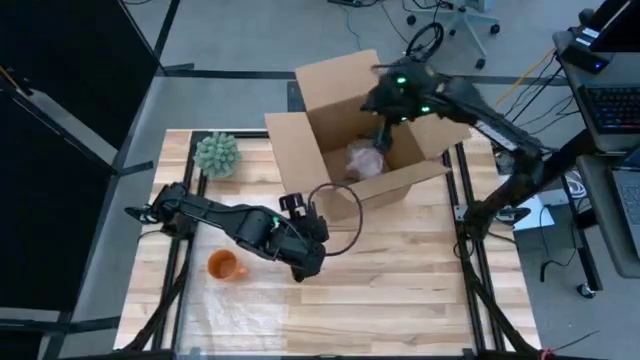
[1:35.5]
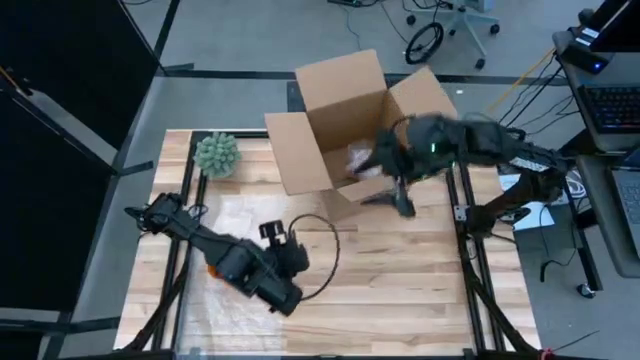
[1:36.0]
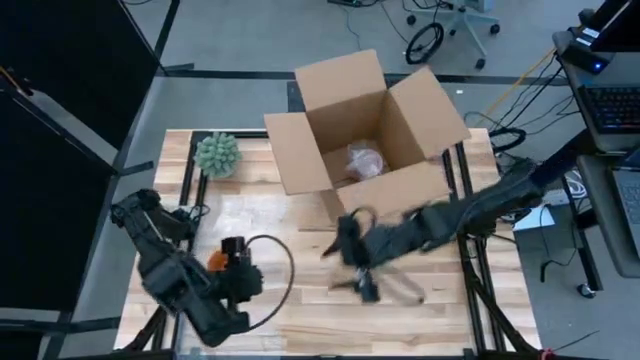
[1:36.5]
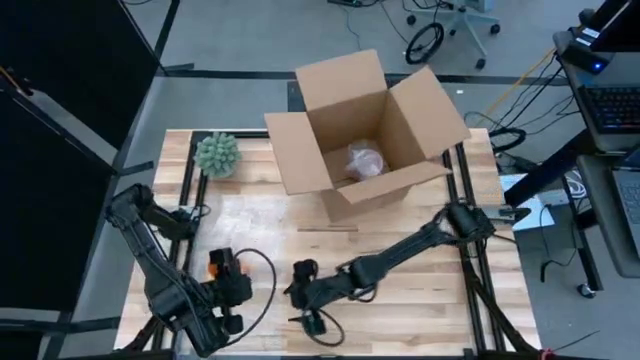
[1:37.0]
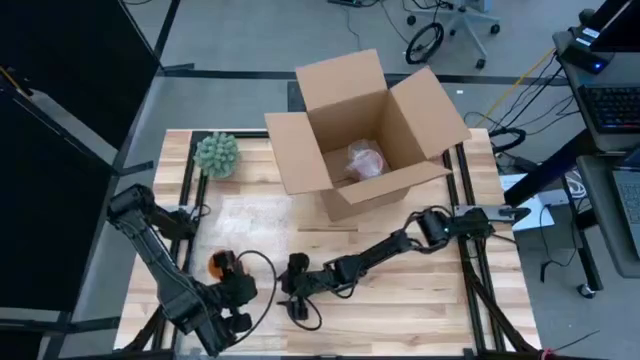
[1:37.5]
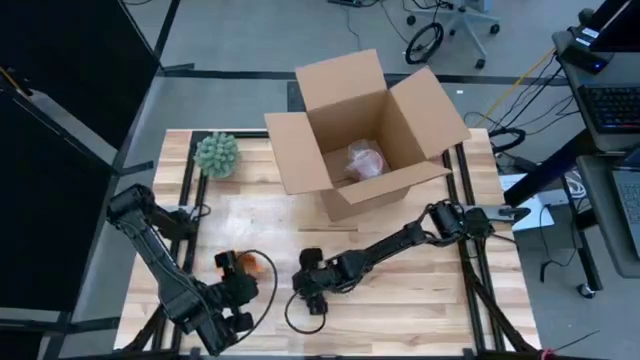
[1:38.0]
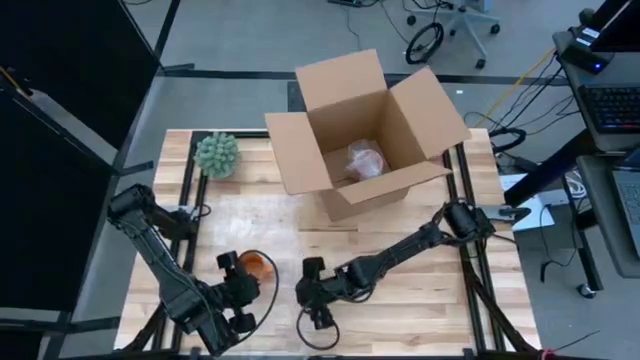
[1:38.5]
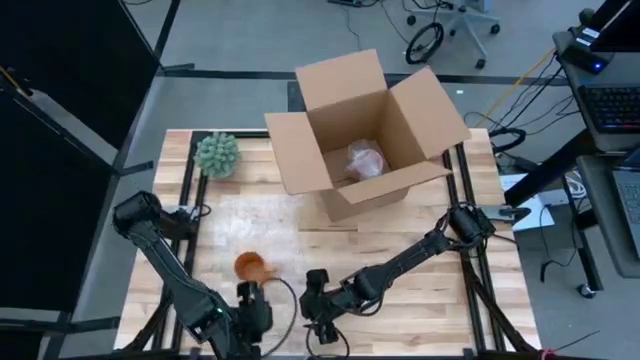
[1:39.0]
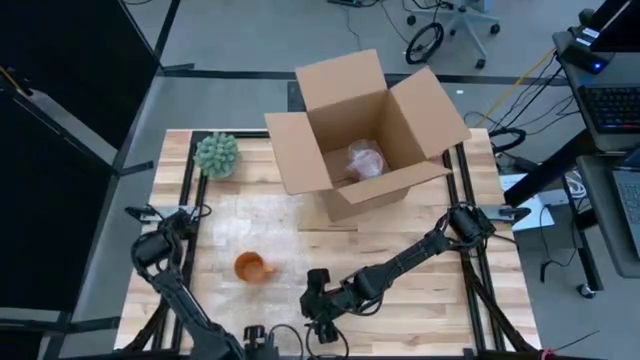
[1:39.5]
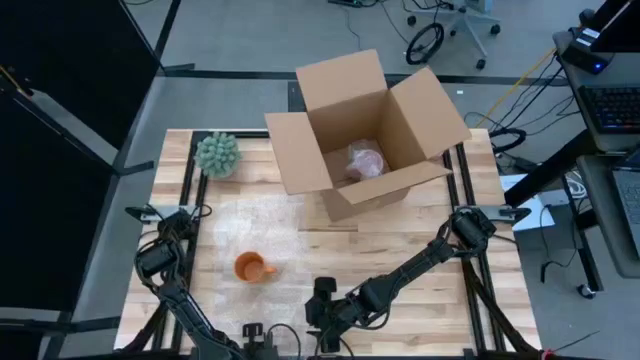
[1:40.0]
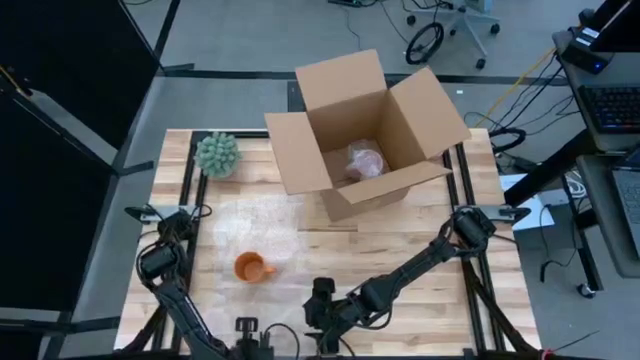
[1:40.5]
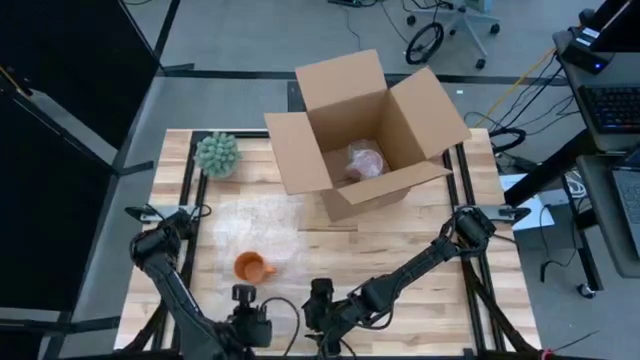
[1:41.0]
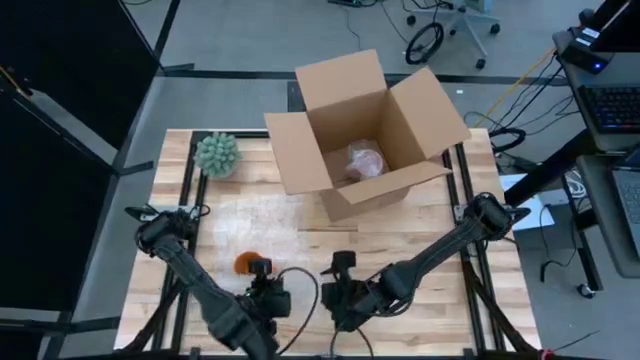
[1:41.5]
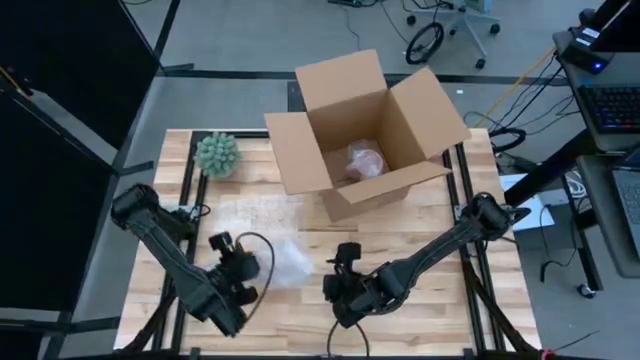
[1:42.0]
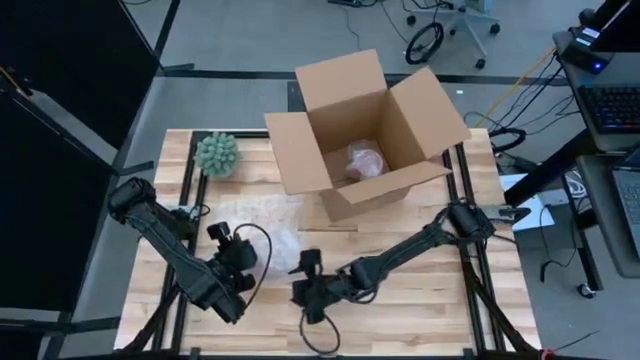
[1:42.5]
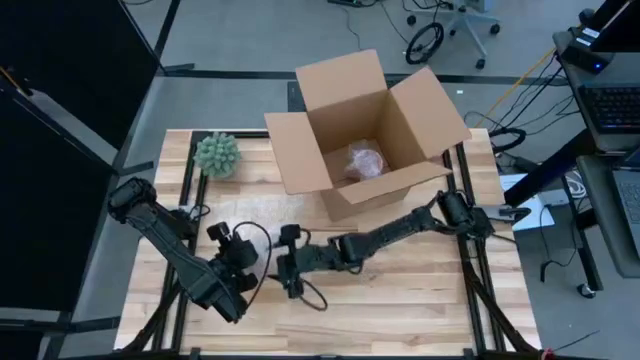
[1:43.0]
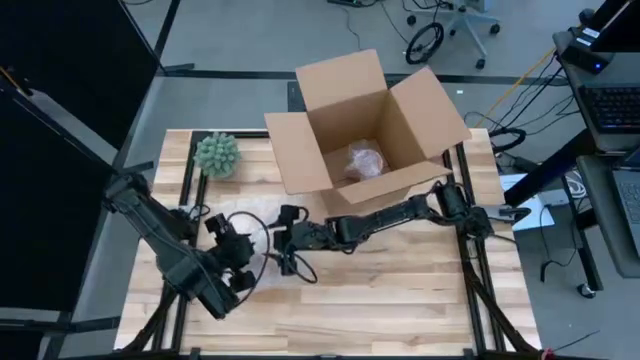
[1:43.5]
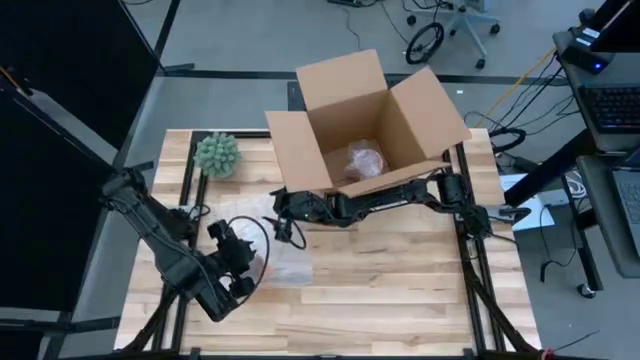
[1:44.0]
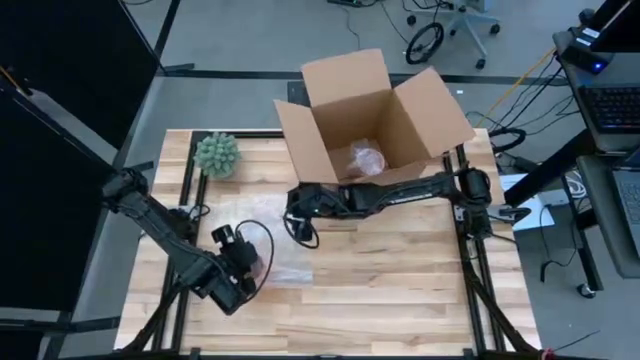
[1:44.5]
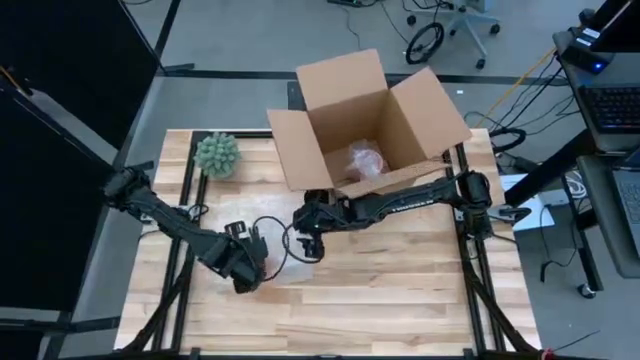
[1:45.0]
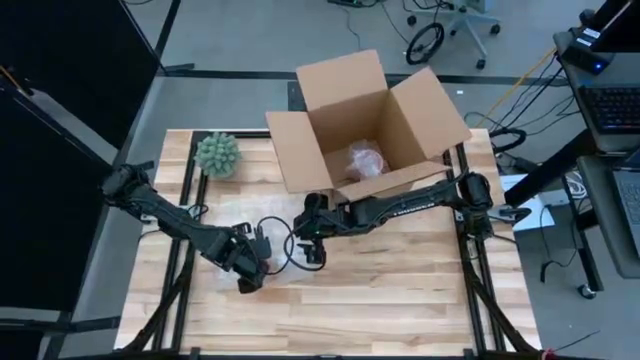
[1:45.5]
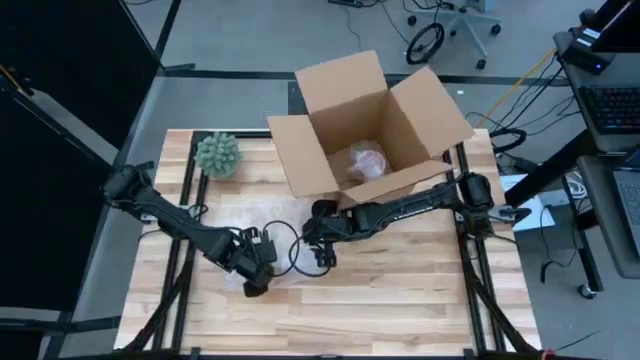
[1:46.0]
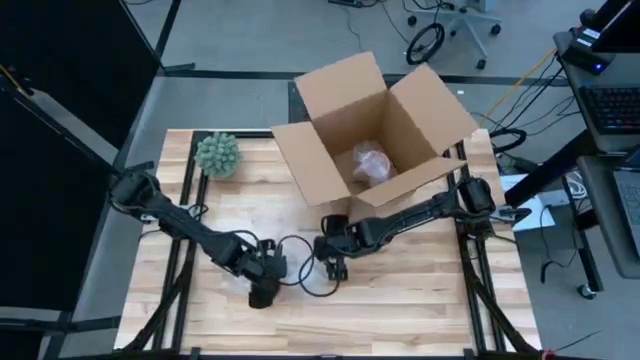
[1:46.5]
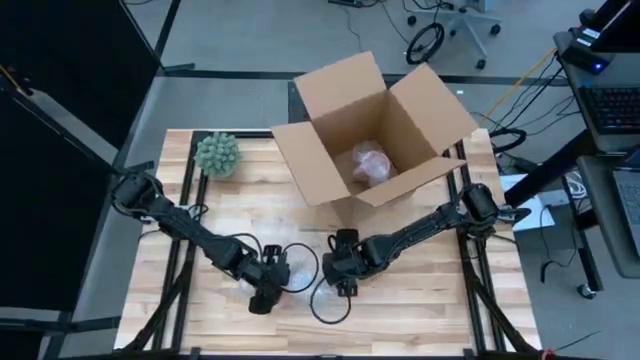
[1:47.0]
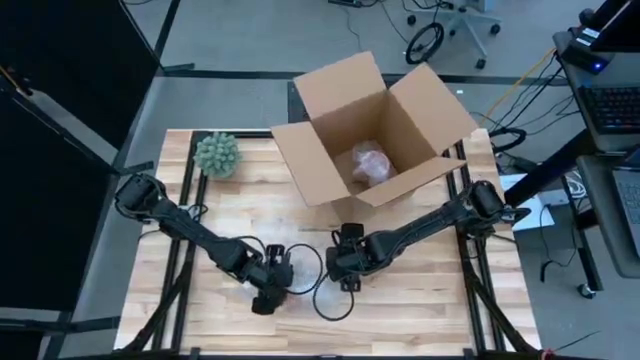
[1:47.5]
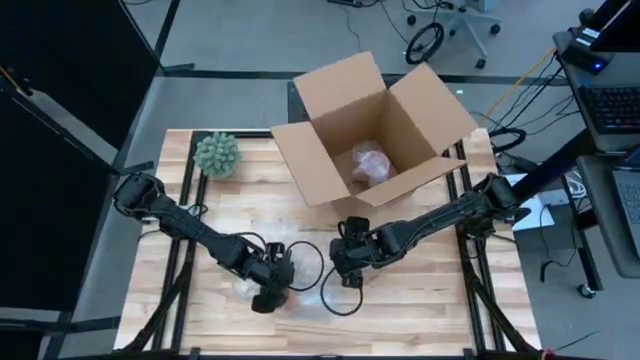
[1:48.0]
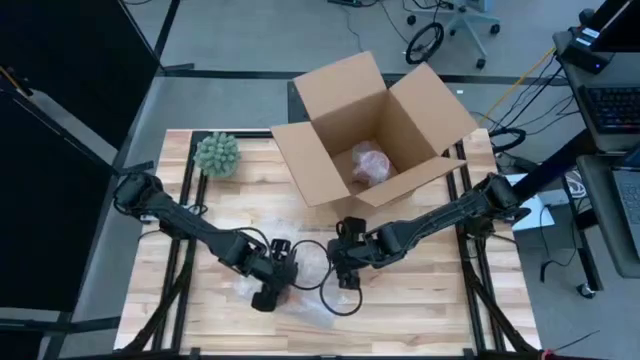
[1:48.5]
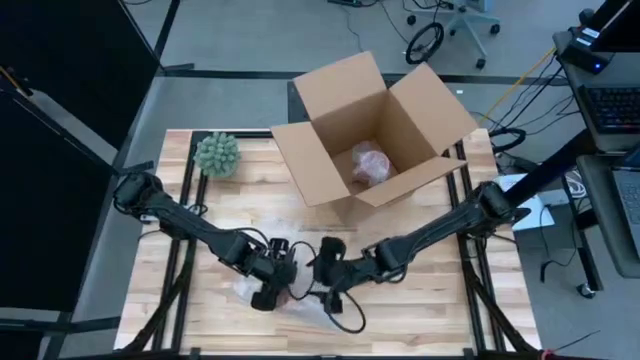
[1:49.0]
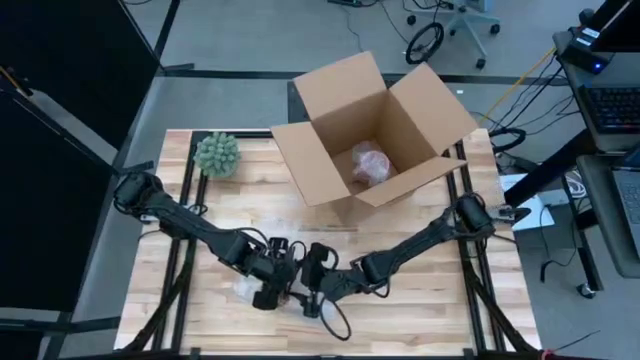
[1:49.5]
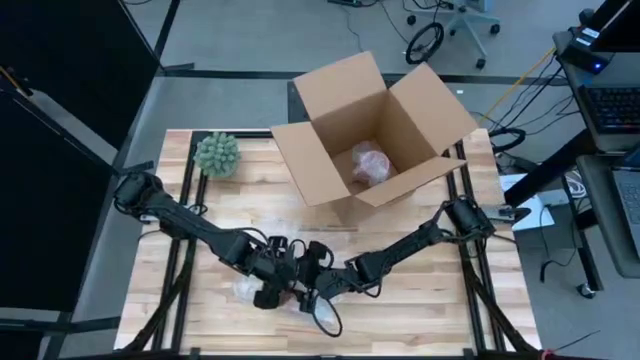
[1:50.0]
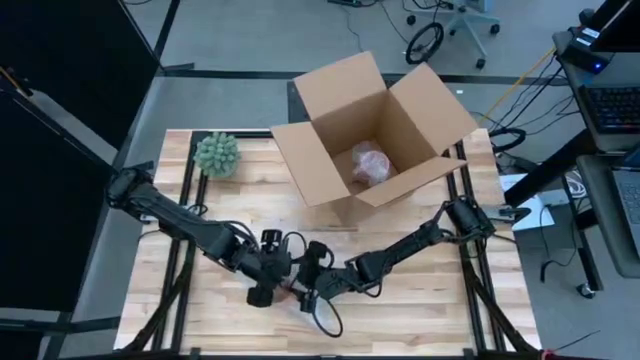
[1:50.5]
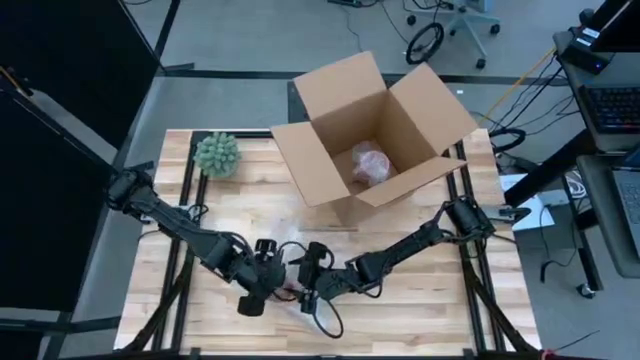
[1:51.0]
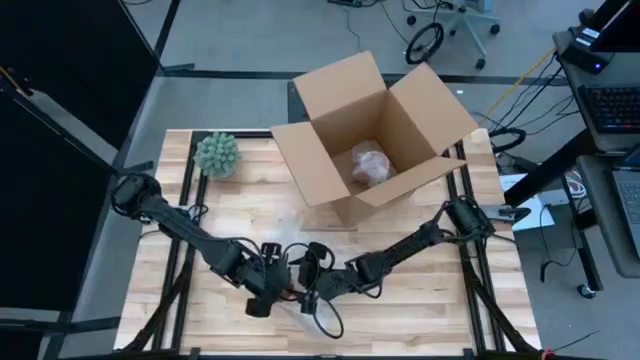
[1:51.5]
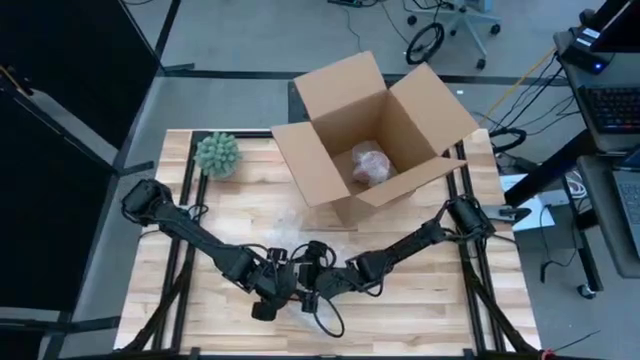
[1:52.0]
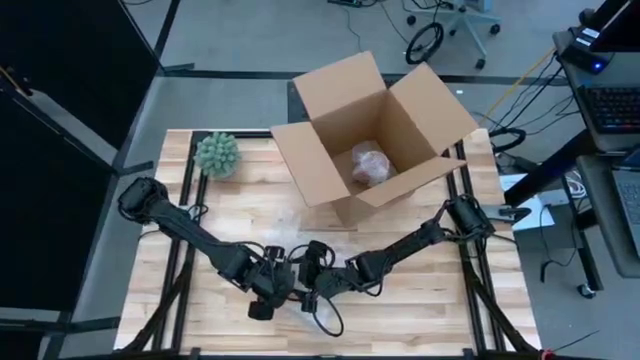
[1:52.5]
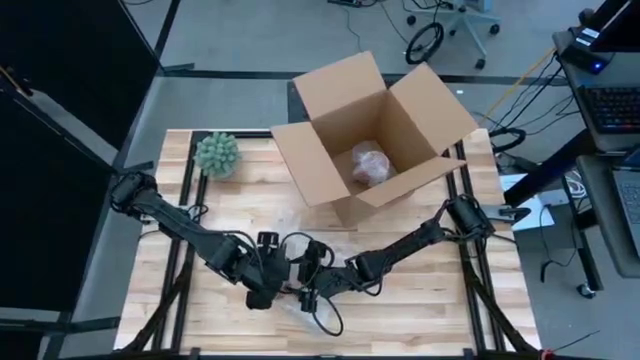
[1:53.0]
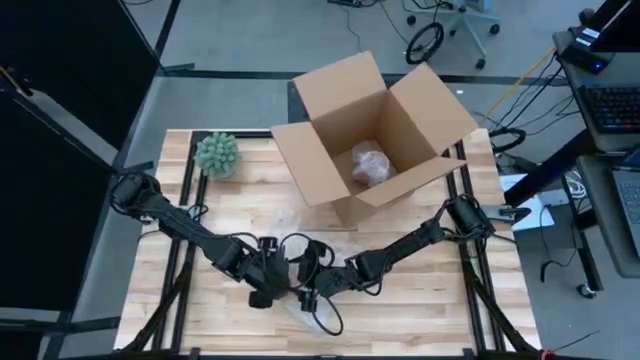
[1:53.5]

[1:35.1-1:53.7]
Task: wrap mug
Wrap the orange mug with bubble wrap

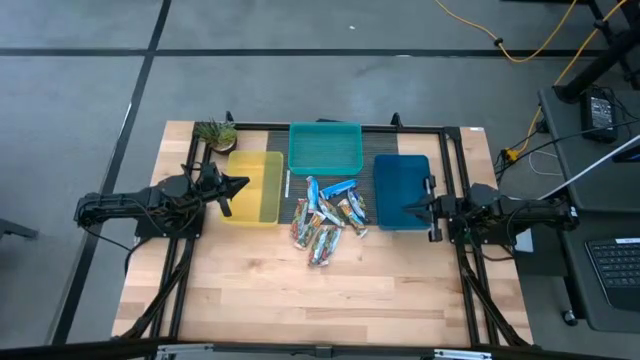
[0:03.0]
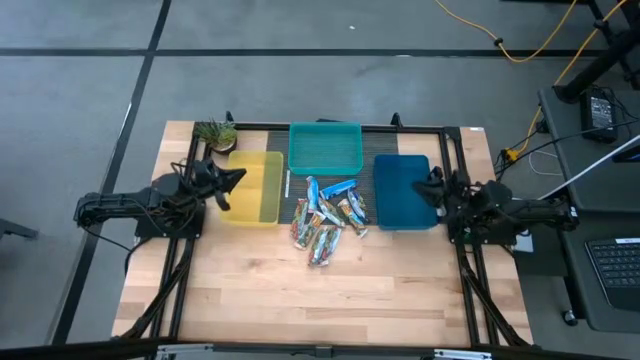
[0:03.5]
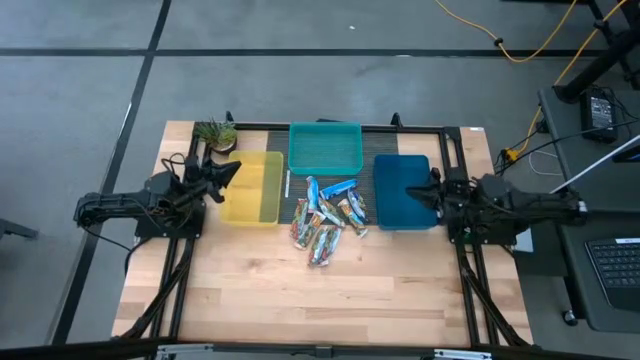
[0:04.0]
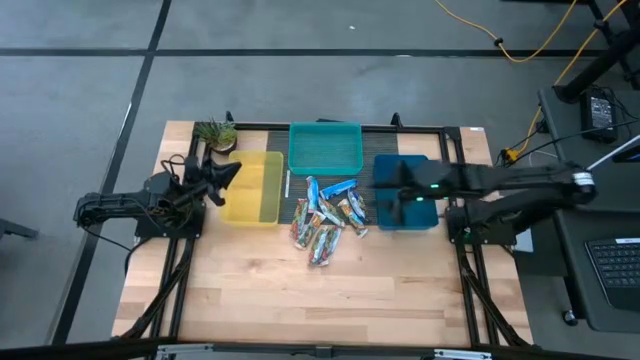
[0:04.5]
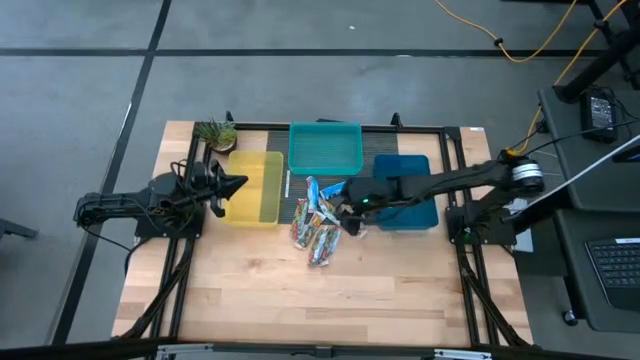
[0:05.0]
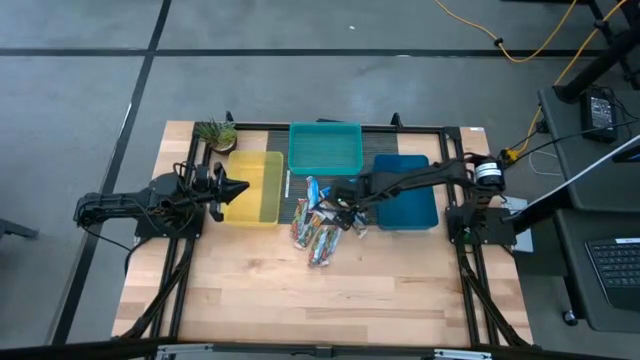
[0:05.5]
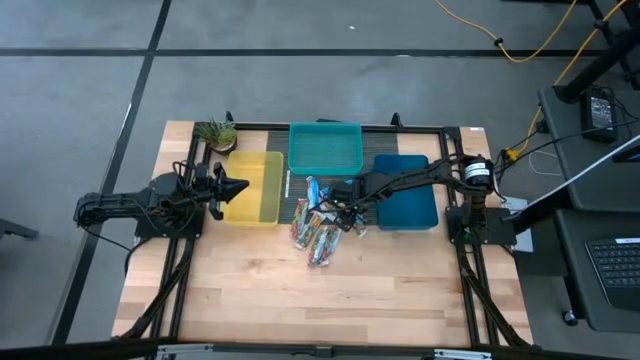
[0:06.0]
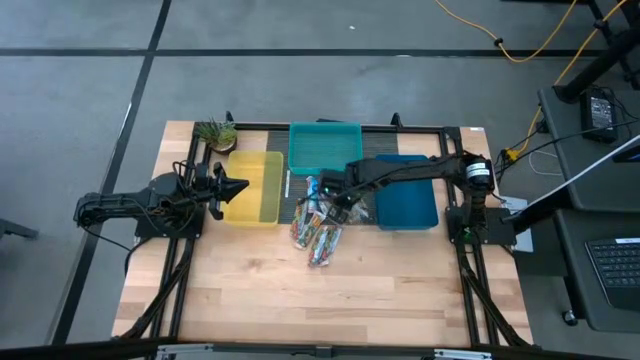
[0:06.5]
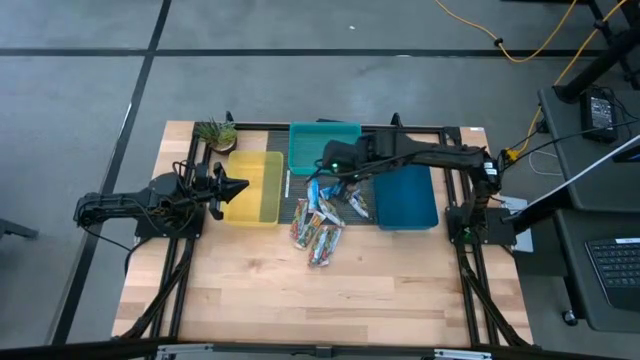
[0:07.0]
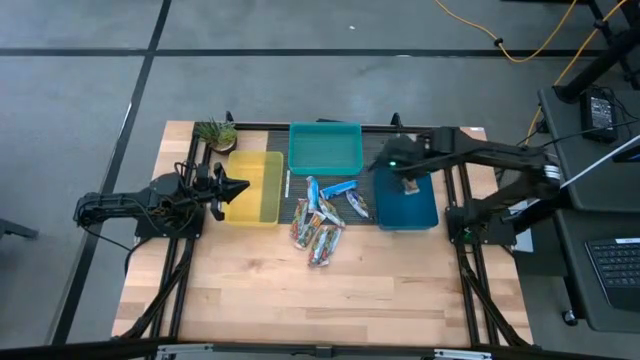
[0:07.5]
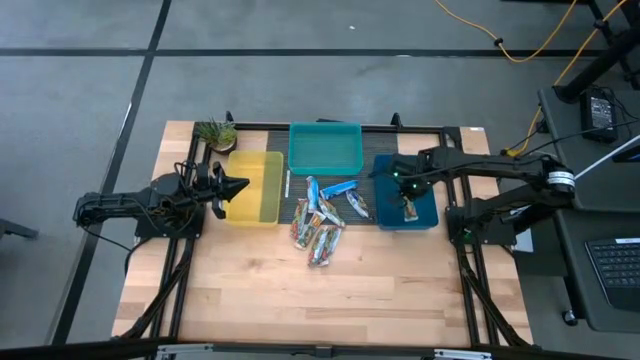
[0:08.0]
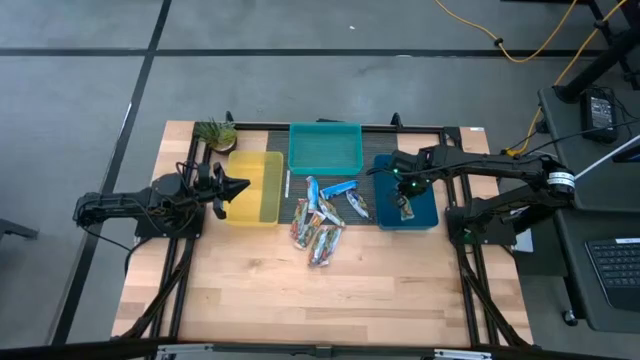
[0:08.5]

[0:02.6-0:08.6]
Task: Pick and place Granola Bars by type
Put the right yellow granola bar into the blue bin
